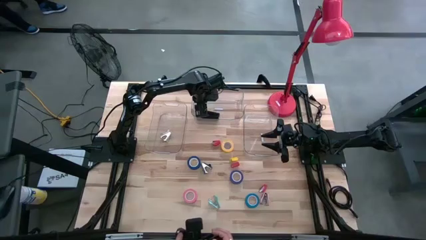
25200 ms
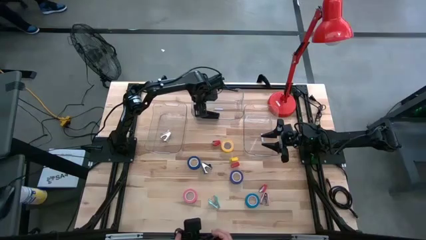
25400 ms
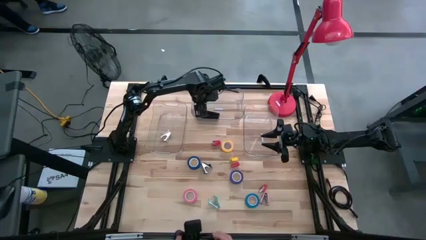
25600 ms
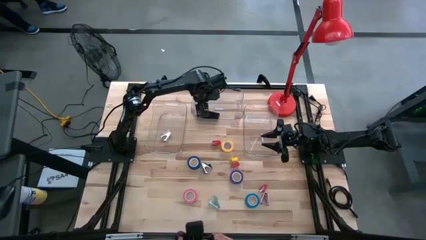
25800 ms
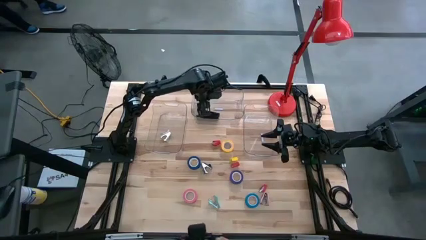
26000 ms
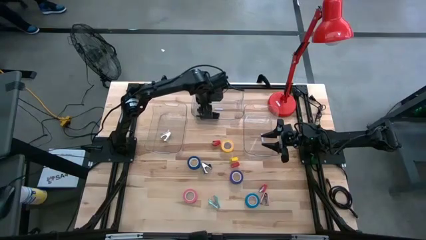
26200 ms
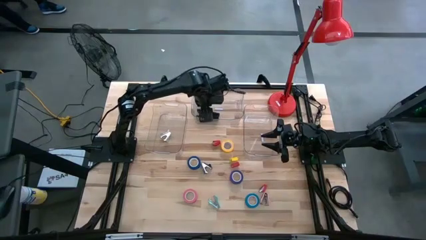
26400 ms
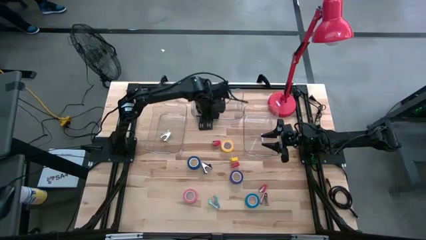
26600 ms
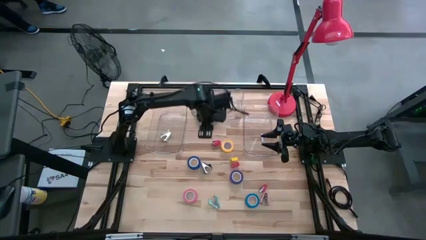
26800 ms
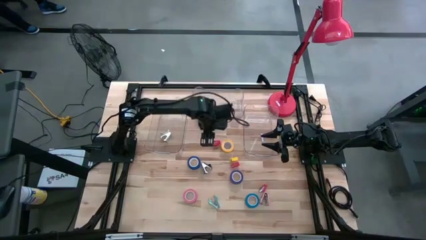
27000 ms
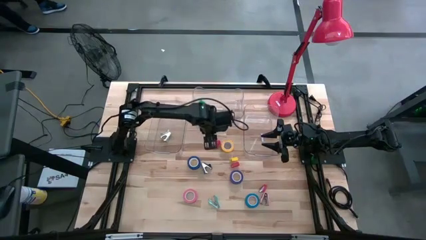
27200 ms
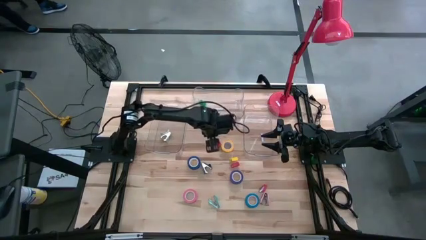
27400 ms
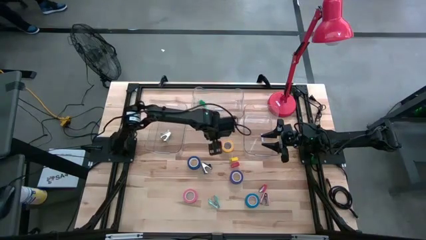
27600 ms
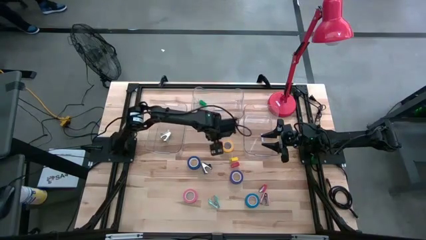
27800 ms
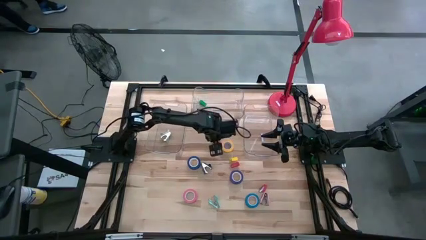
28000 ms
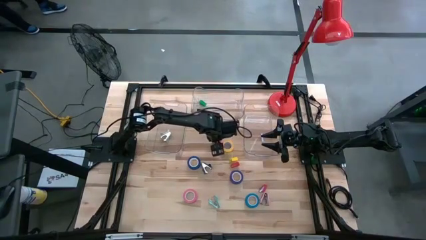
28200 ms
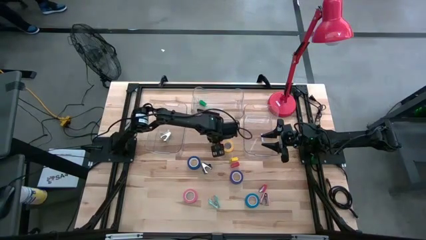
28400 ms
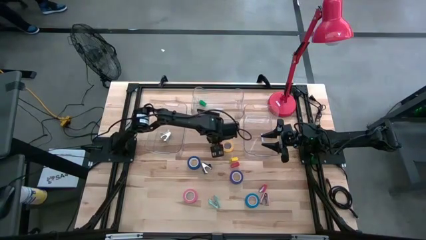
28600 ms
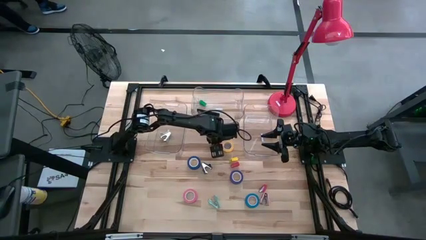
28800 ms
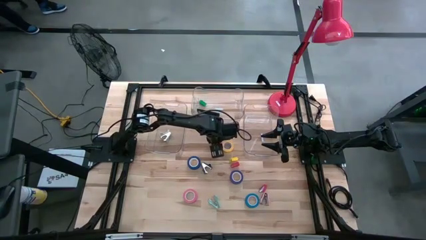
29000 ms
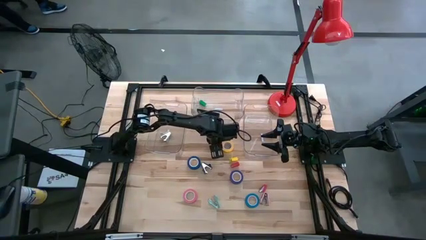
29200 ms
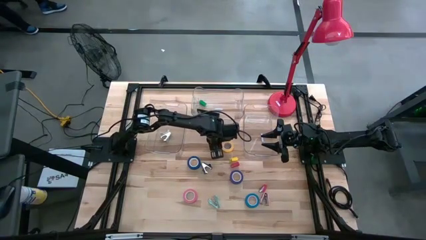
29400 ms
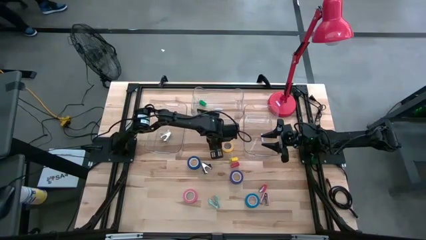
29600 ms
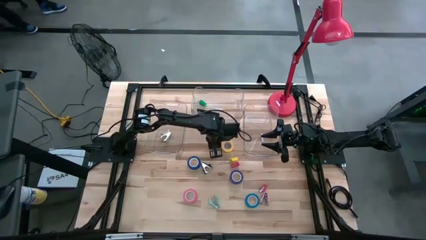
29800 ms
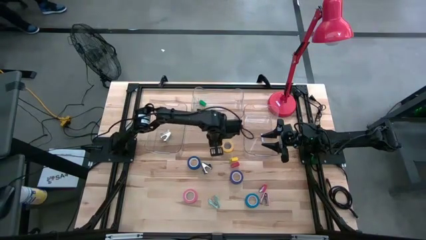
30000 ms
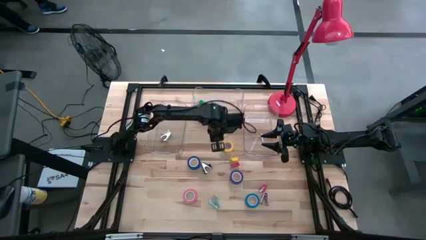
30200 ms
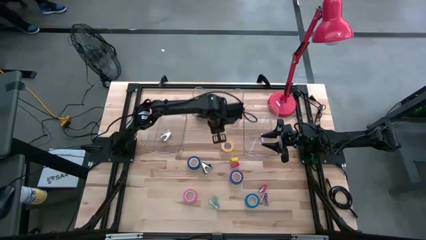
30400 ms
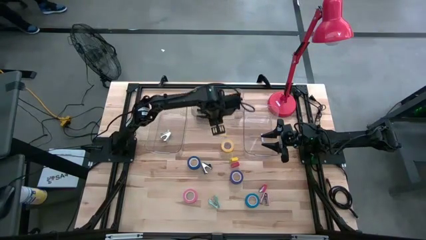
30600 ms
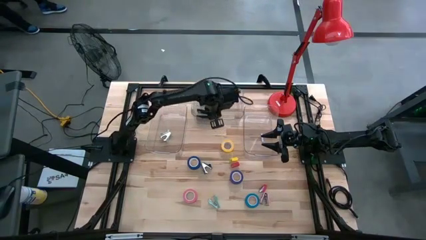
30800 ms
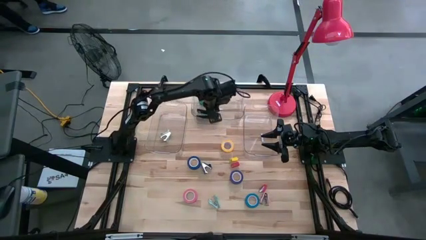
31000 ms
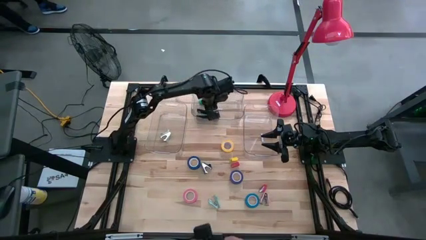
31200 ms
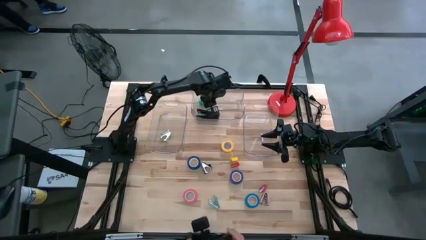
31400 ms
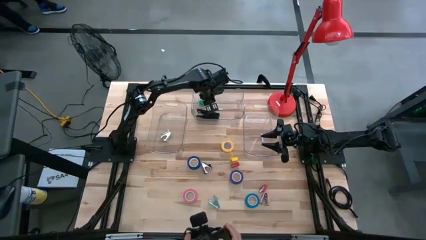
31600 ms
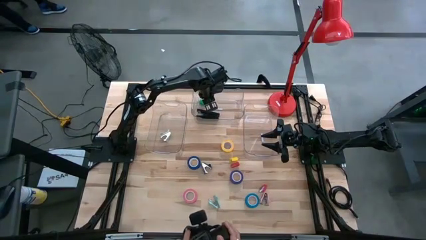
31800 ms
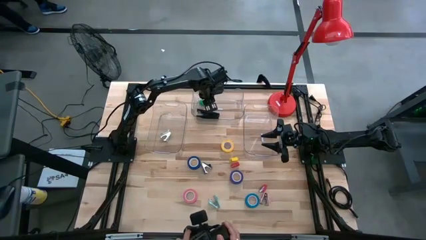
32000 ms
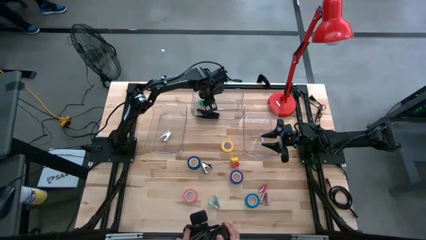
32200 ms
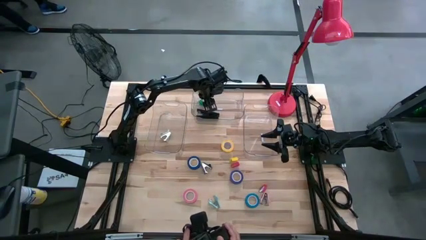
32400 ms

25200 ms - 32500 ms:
Task: Pick and place Stapler, Stapler remover, tape
Put the top red stapler into the top transparent bin

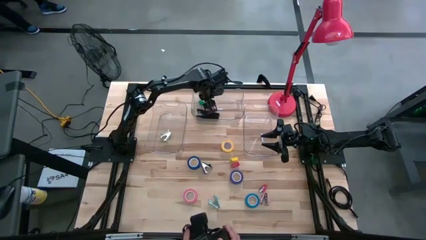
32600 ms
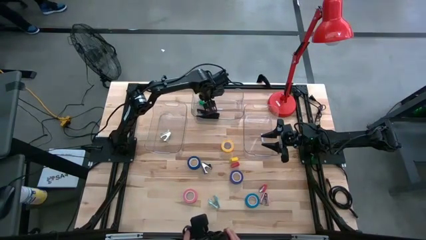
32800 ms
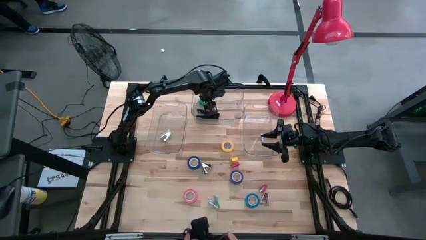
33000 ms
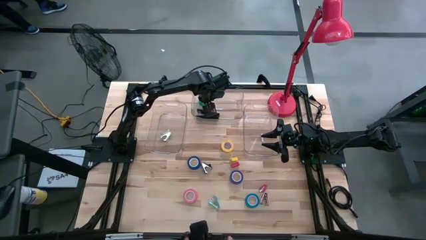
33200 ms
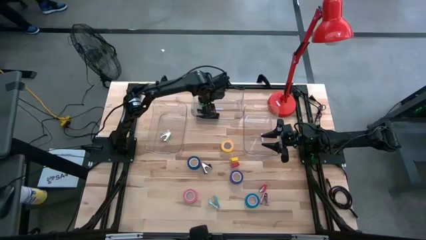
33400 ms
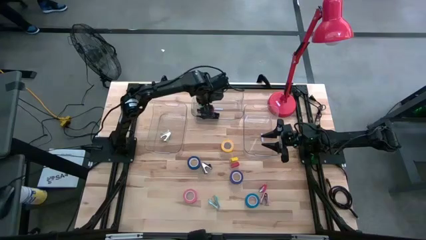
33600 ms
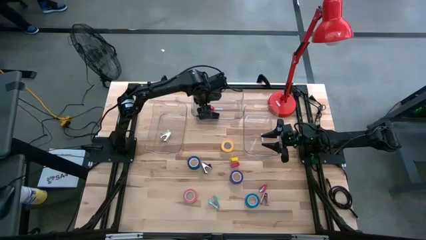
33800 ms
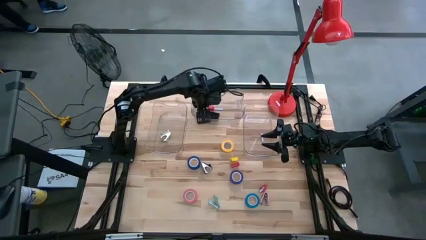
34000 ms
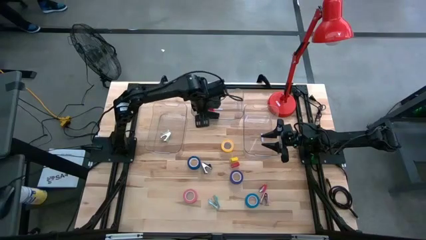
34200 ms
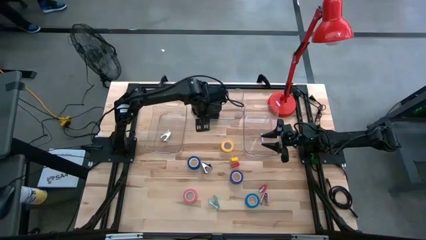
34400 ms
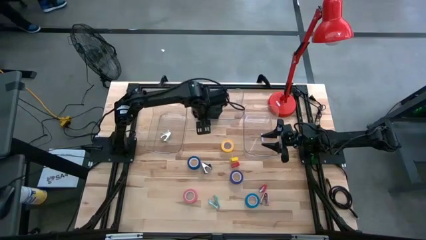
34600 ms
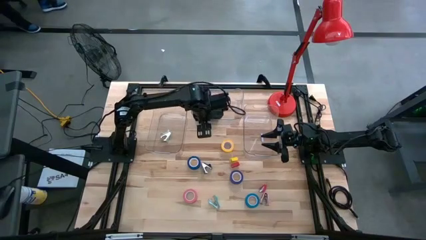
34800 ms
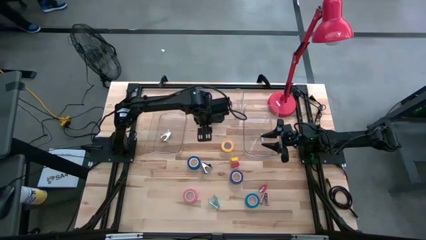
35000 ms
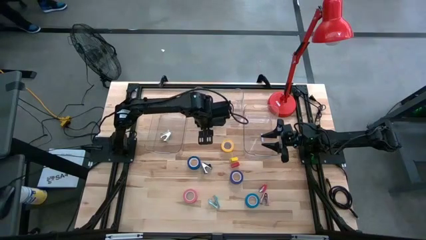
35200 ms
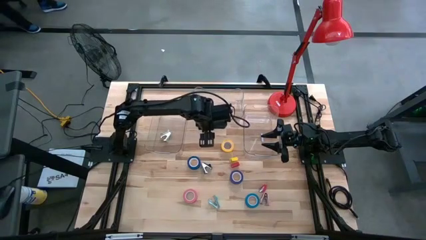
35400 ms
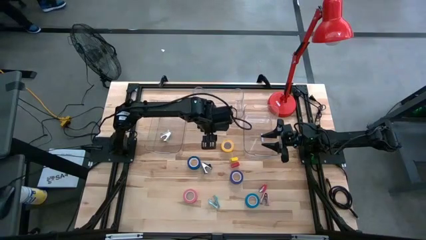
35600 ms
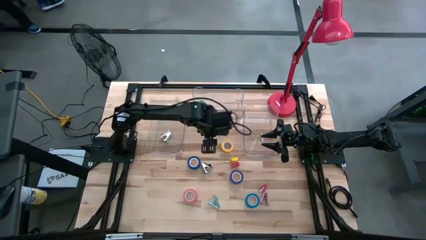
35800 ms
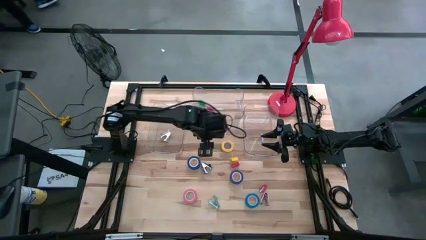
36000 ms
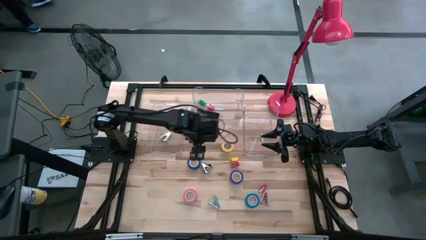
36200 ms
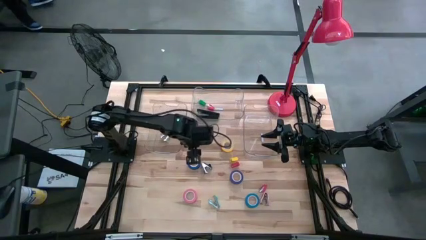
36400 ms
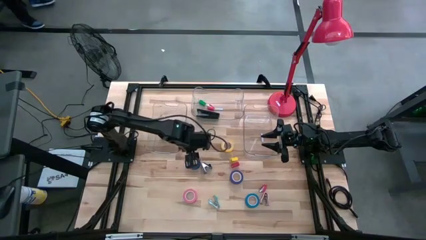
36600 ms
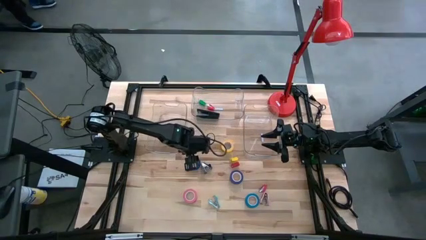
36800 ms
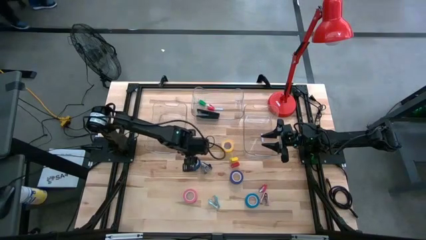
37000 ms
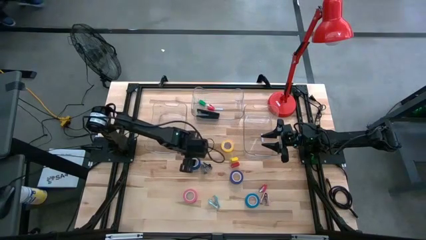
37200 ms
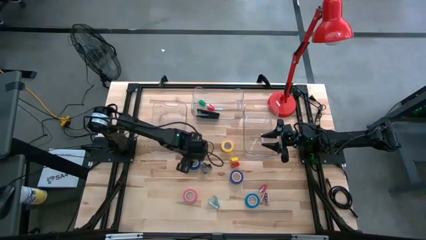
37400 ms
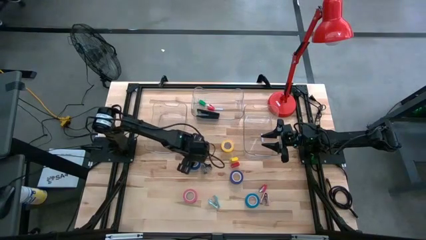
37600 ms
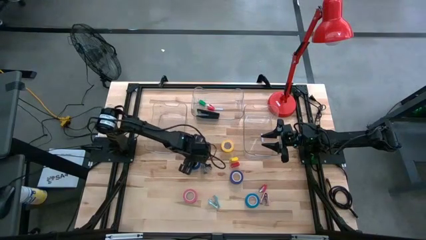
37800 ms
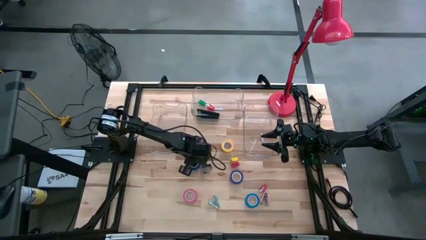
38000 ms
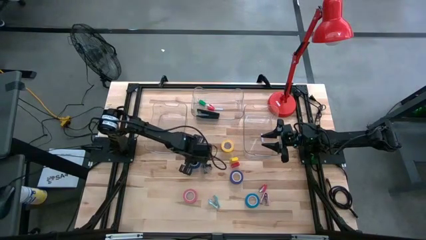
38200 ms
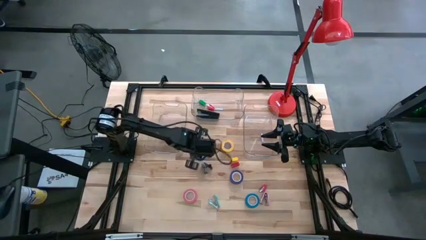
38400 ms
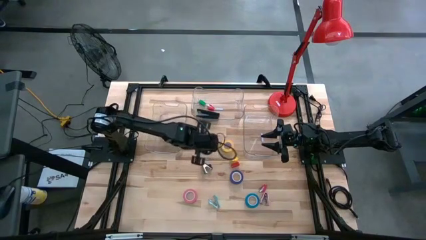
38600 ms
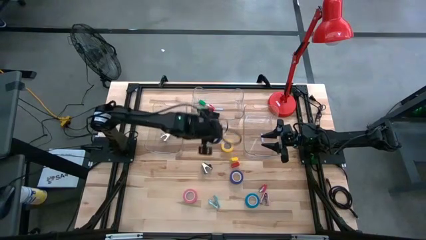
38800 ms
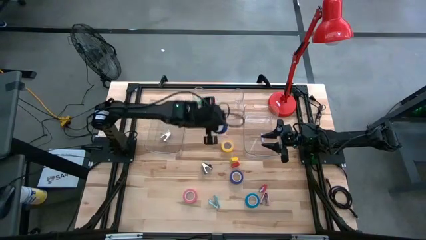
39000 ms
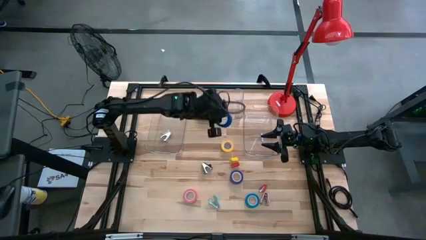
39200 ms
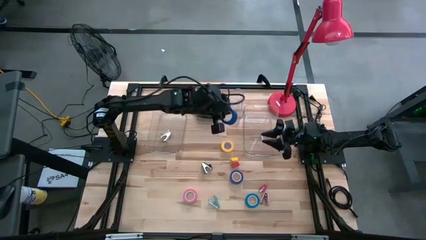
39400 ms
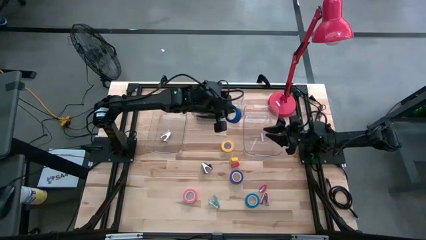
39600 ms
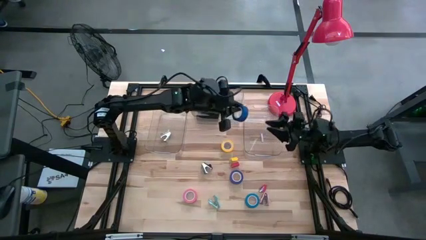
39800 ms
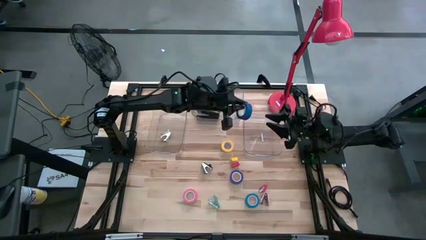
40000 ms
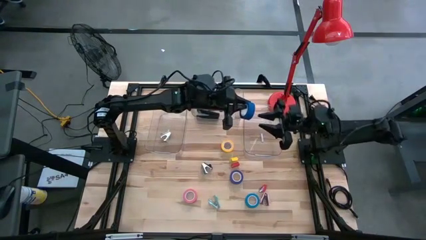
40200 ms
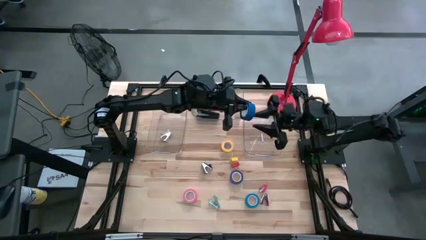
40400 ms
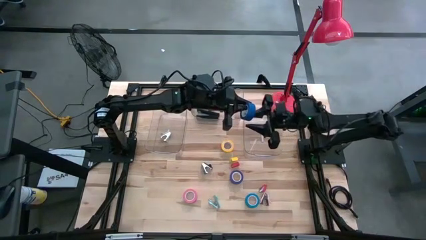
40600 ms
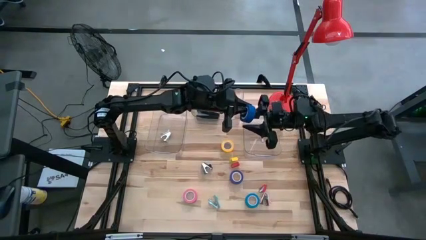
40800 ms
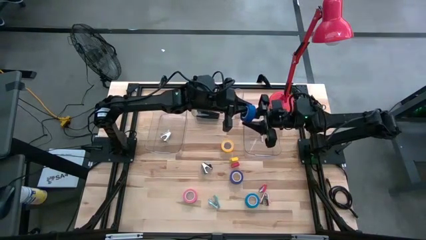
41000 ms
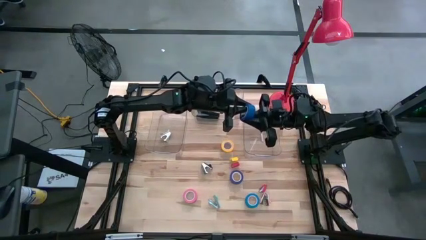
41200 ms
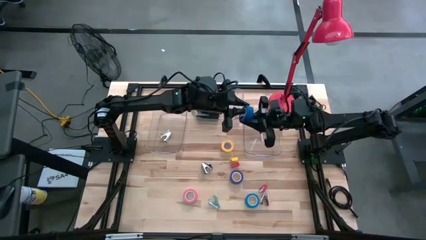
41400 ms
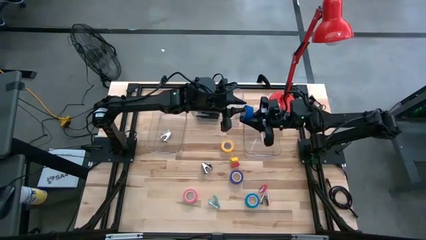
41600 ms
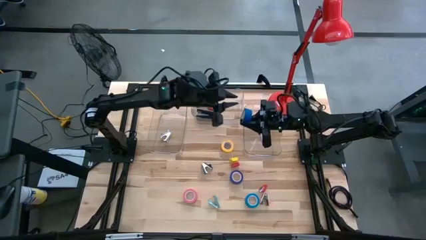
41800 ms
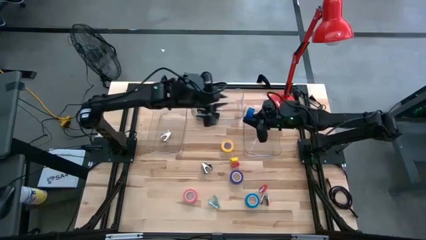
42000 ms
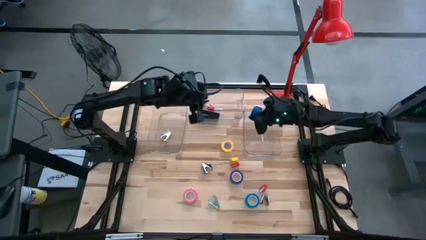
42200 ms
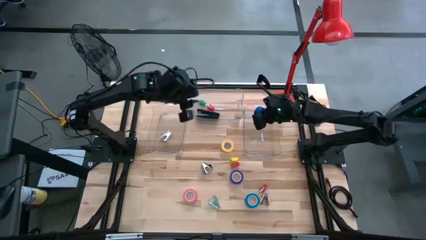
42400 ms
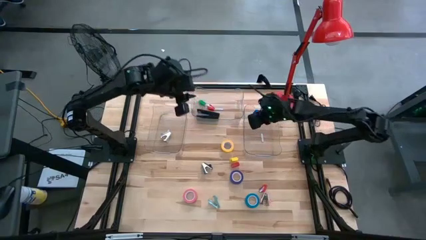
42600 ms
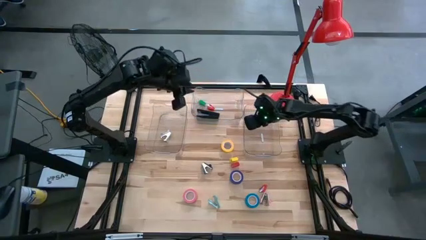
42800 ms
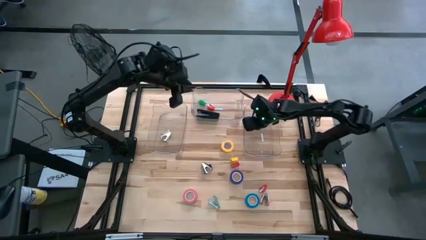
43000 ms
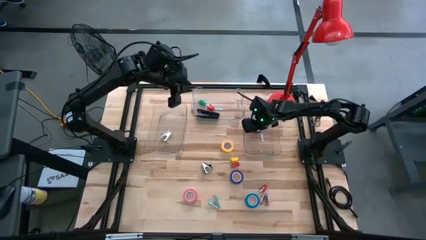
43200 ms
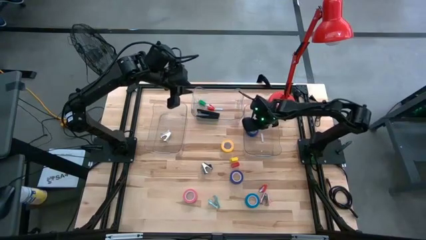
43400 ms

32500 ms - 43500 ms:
Put the blue tape into the bottom right transparent bin
